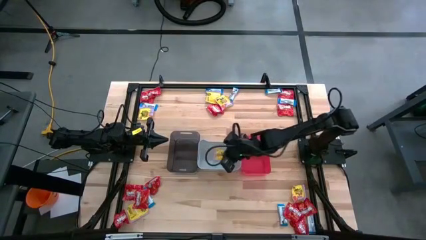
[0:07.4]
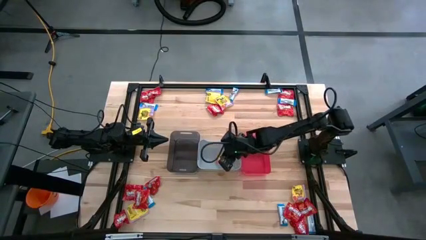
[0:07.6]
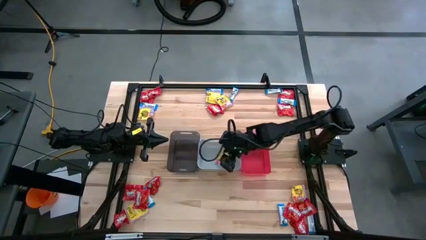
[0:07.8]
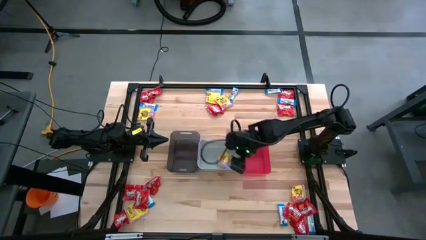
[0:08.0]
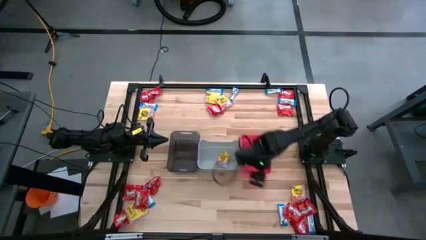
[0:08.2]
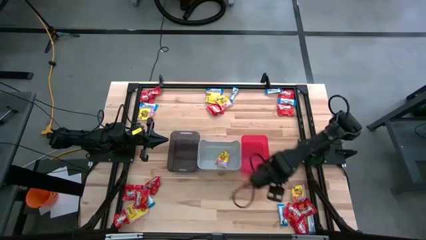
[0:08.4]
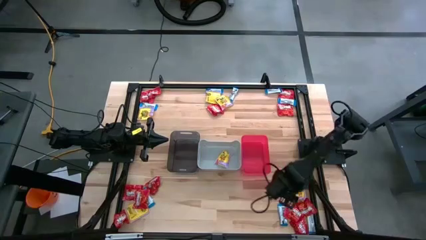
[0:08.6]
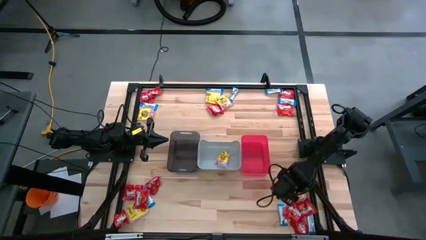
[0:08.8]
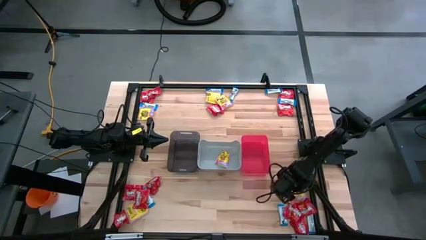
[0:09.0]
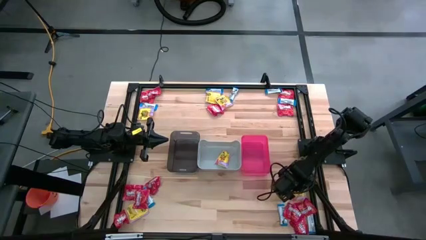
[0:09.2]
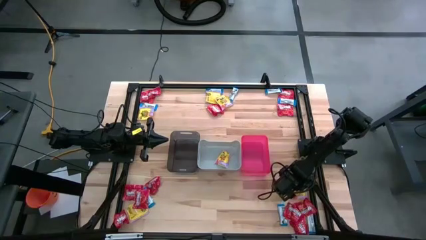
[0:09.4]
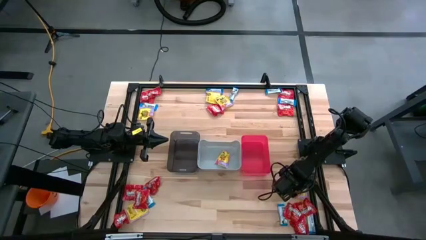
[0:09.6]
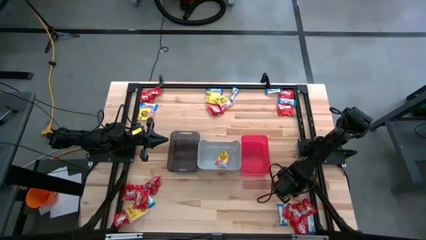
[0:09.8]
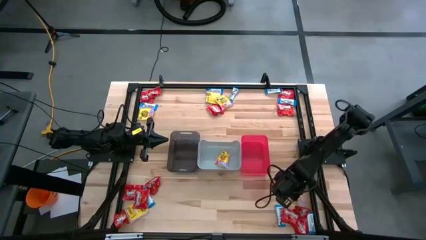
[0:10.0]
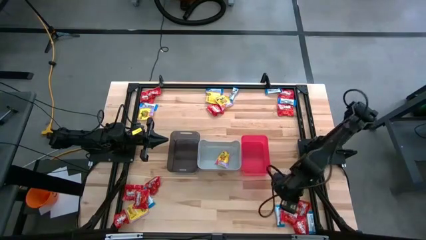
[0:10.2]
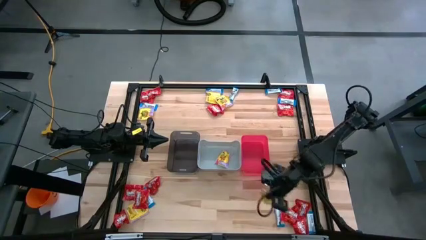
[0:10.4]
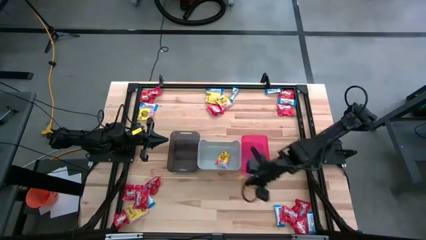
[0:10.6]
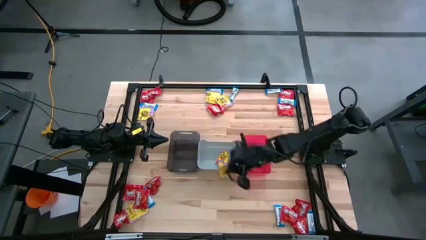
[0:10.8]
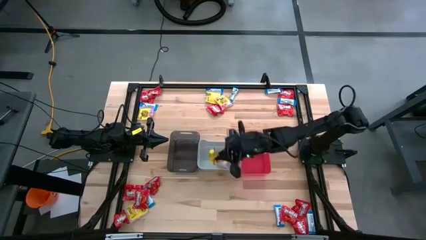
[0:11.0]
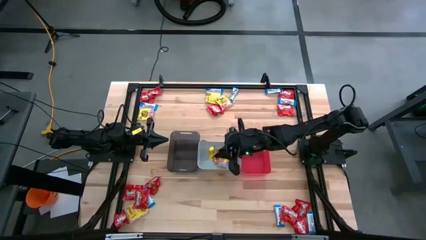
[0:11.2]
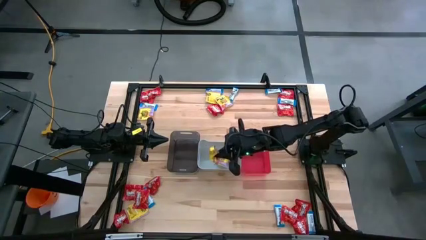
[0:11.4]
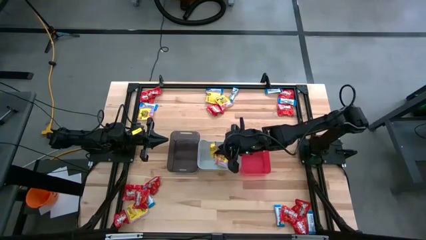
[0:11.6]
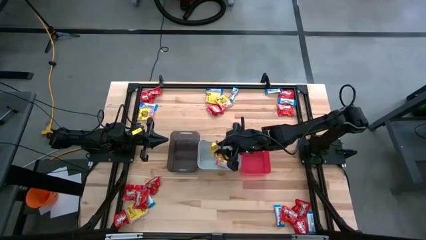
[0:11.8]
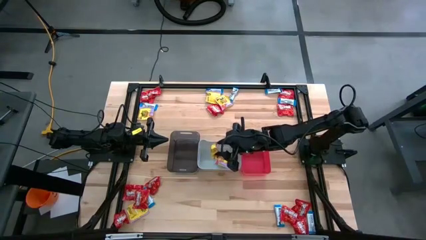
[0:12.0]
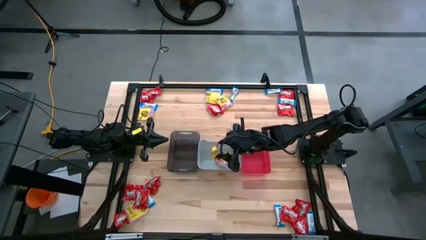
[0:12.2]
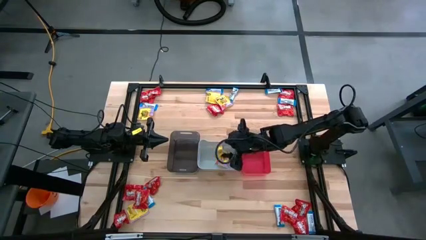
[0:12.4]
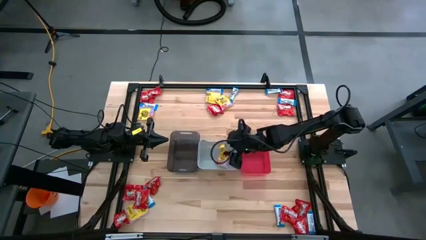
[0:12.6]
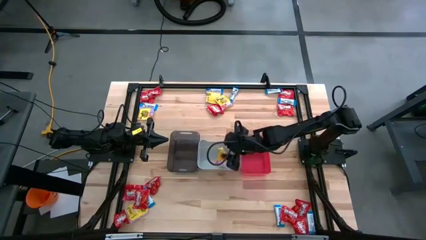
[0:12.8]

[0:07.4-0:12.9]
Task: Sort candy
Put the yellow candy into the gray bin

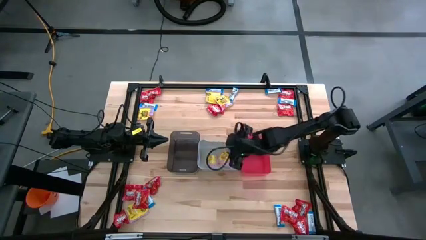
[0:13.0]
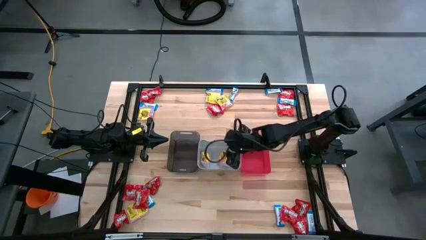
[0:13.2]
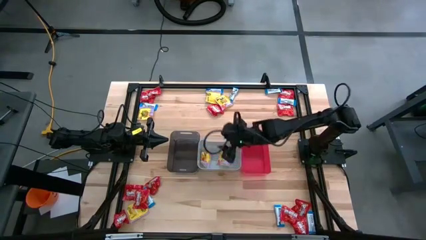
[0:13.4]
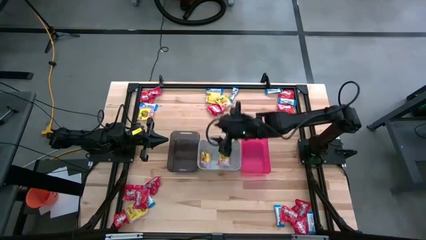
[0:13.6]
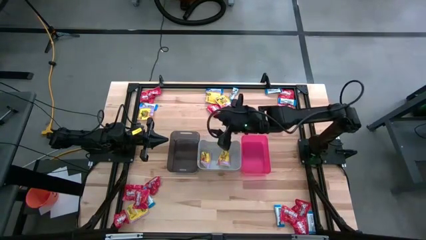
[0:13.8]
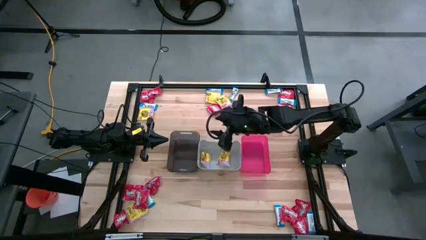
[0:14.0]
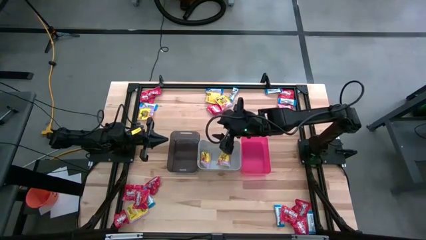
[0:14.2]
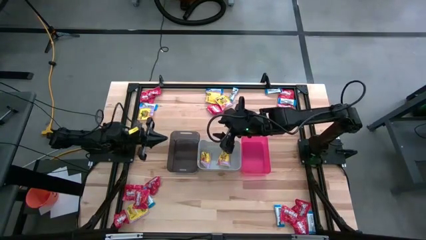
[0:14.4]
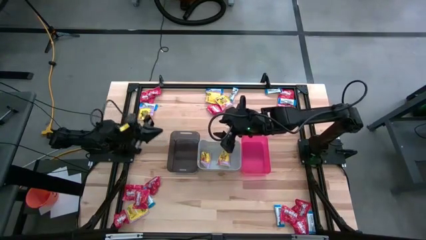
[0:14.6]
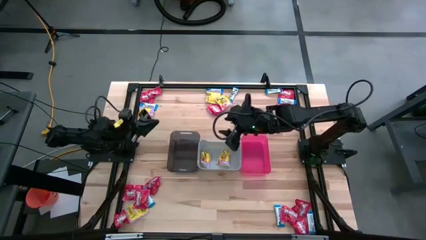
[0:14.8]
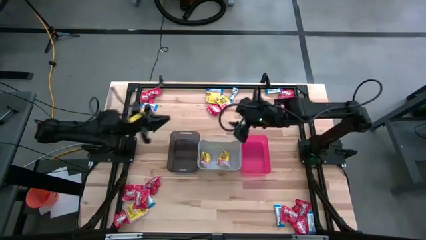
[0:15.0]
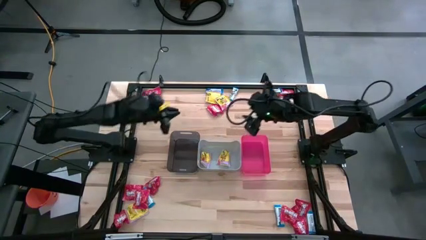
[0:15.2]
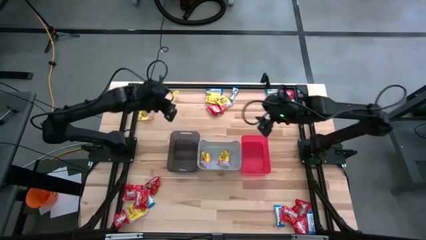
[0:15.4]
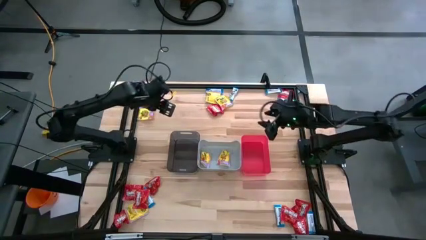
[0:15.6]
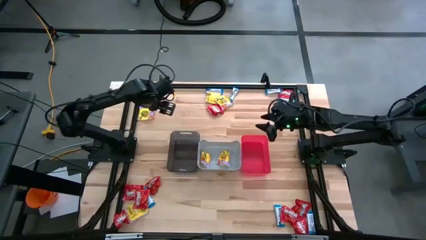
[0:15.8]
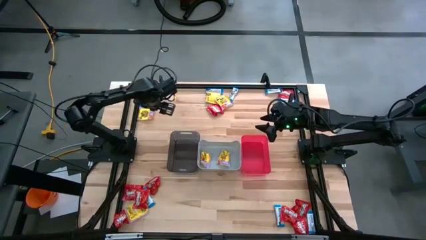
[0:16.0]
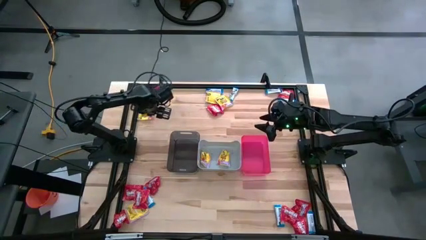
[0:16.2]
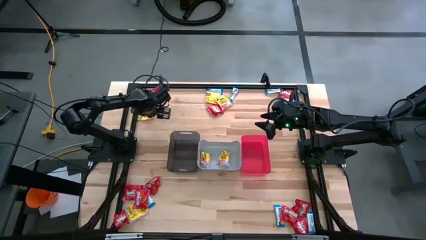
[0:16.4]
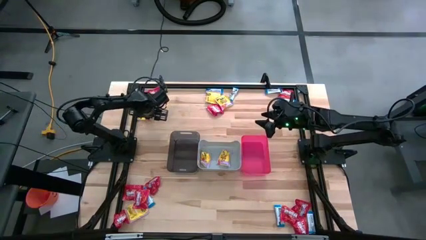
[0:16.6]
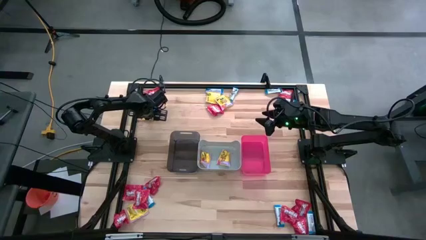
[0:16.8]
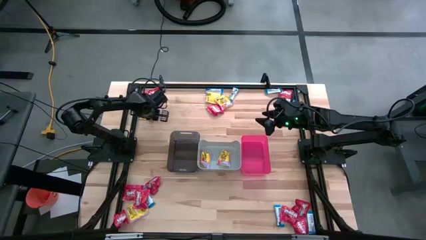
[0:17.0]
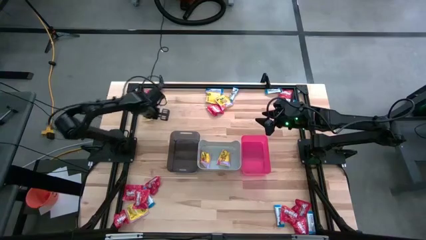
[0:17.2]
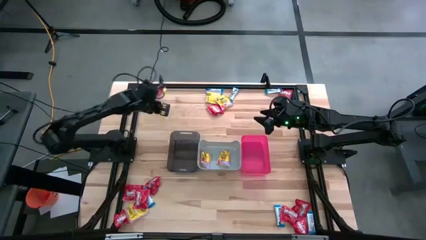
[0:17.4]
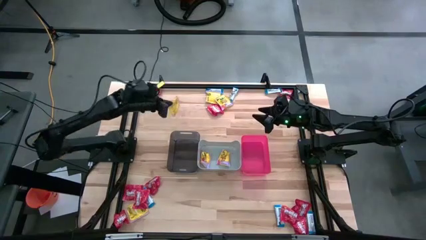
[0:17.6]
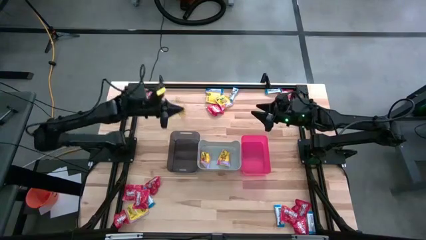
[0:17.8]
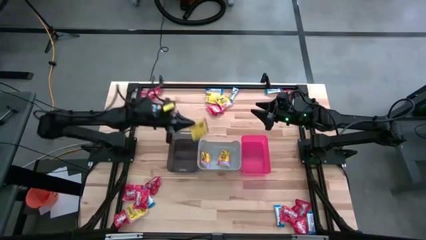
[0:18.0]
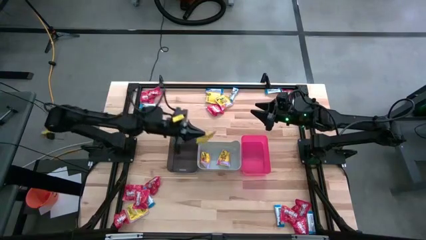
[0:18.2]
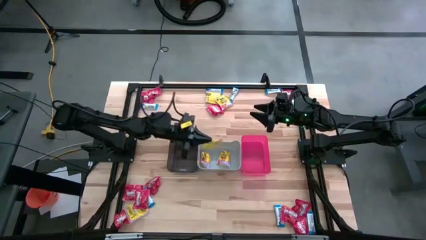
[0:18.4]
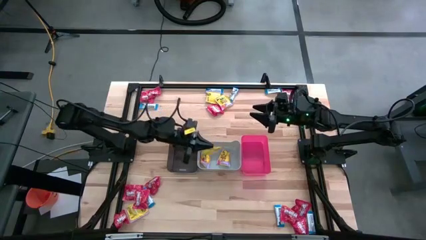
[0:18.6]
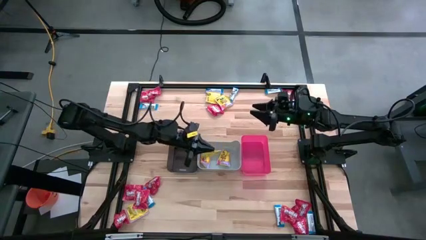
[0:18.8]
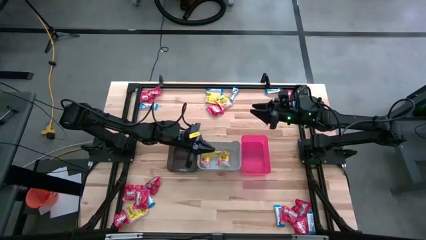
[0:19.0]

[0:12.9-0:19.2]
Put the yellow candy into the gray bin

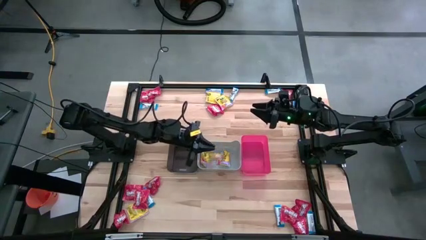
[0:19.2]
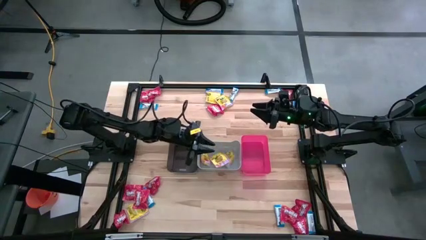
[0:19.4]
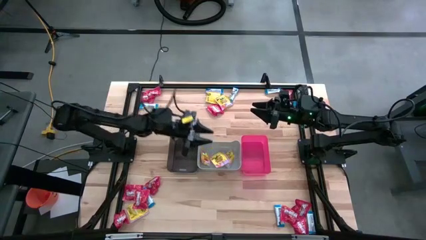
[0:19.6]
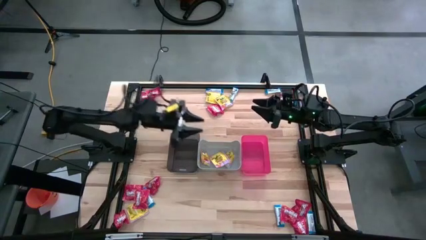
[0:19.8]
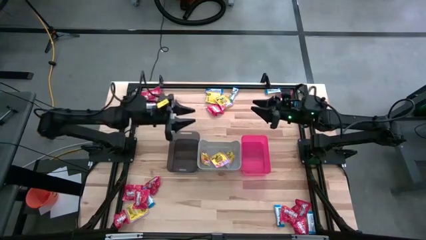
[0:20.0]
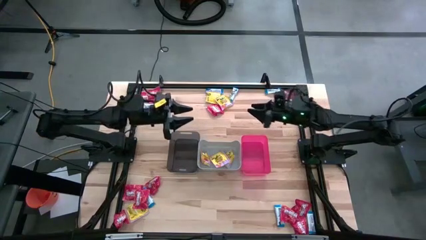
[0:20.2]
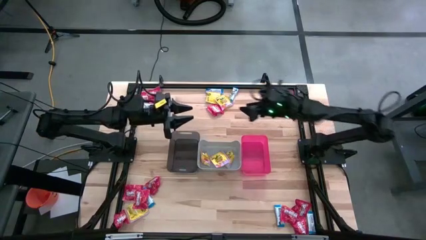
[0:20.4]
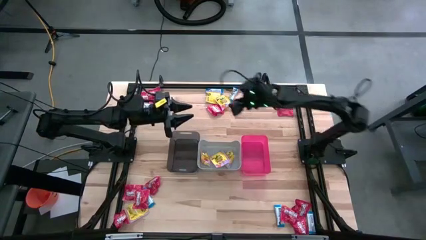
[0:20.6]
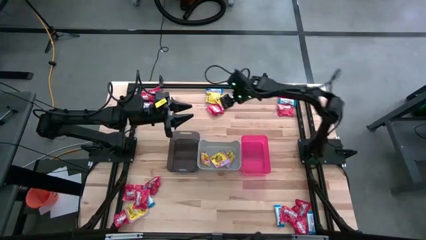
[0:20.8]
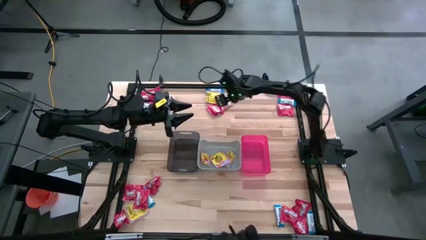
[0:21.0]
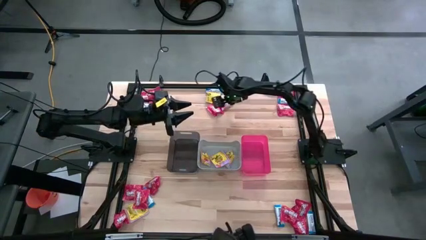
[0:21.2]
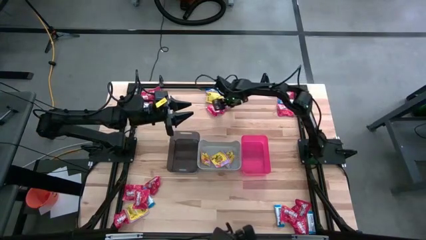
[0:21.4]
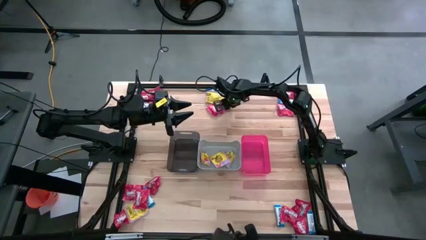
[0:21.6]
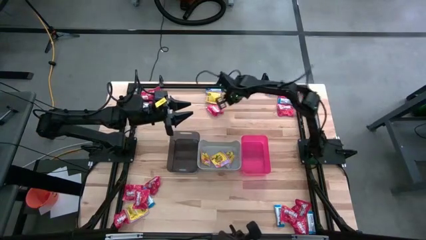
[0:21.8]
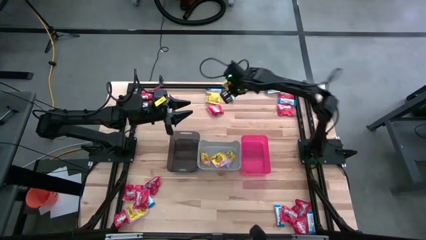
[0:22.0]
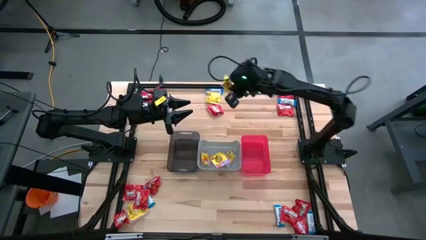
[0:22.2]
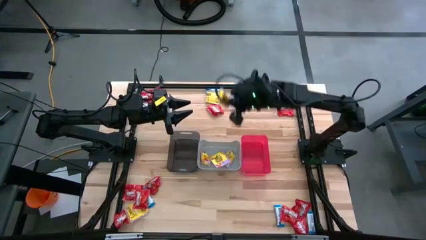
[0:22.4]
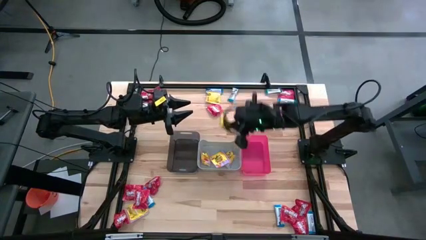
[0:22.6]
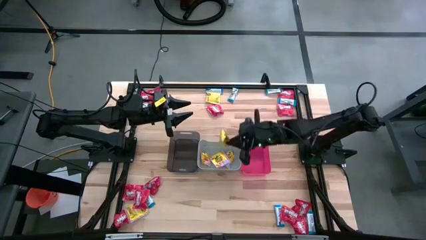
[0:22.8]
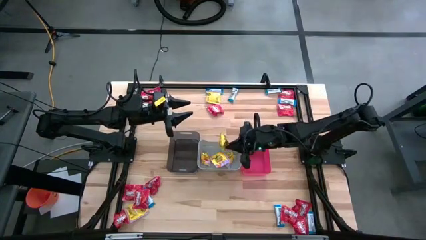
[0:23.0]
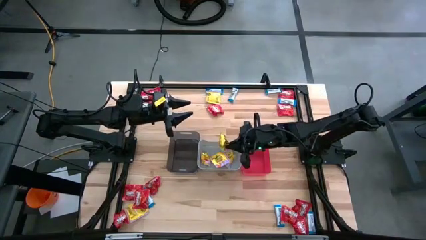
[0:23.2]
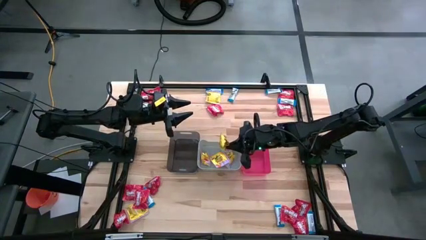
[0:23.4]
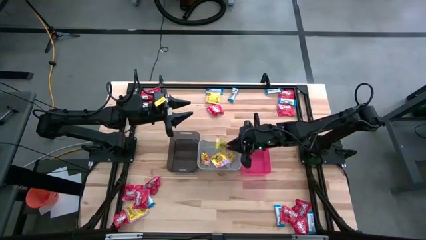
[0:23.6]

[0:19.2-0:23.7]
Put the yellow candy into the gray bin

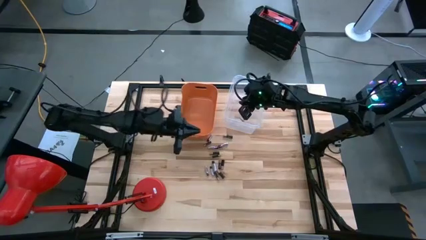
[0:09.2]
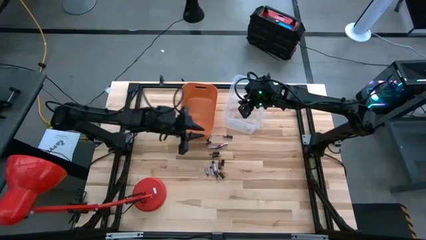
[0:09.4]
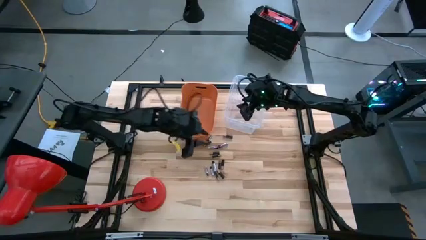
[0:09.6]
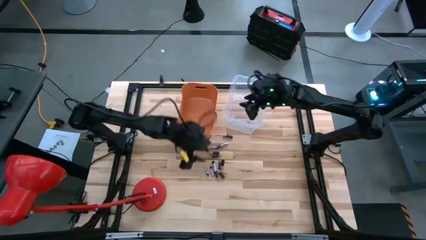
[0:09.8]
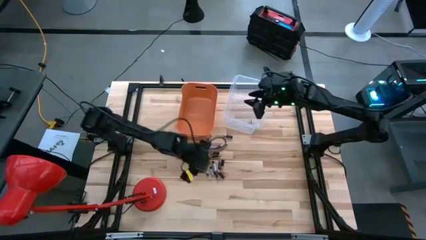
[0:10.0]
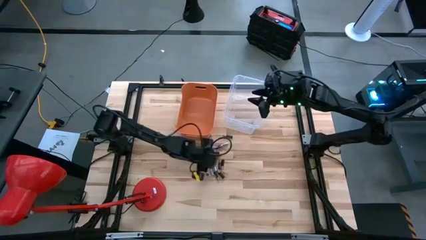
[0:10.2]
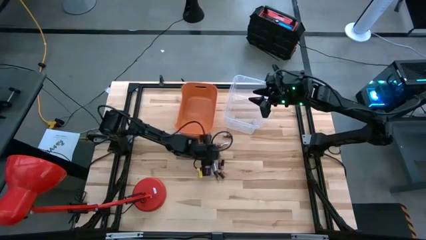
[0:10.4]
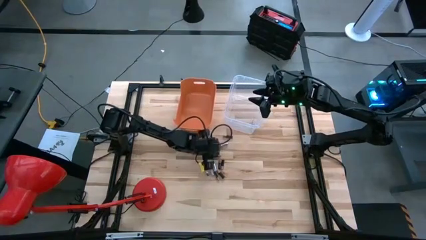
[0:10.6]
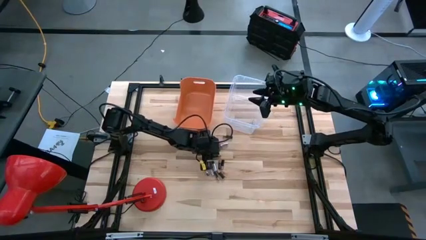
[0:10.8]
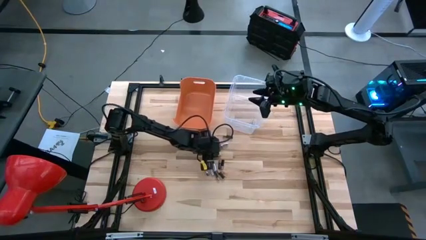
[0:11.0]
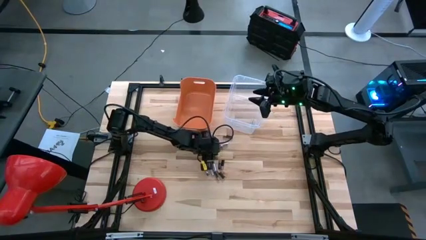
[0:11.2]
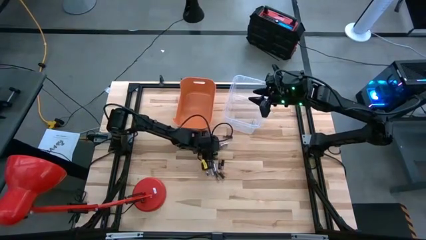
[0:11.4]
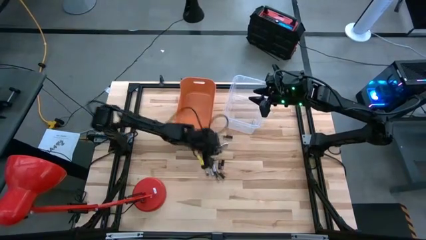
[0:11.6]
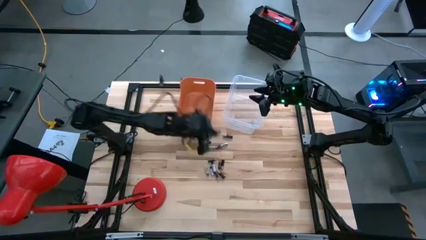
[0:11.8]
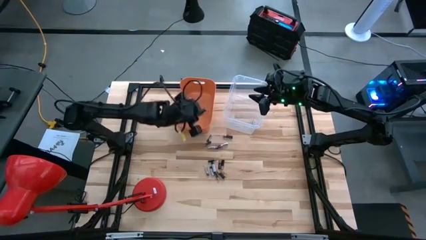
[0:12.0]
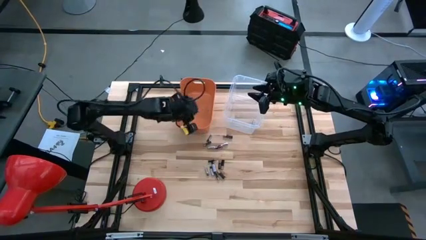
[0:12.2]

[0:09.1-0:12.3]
Task: Sort batteries
Put the brown battery into the orange bin
